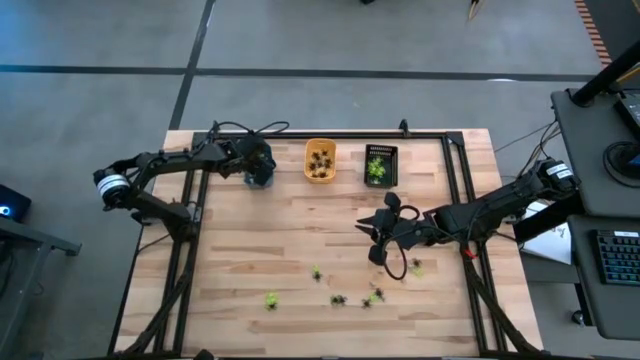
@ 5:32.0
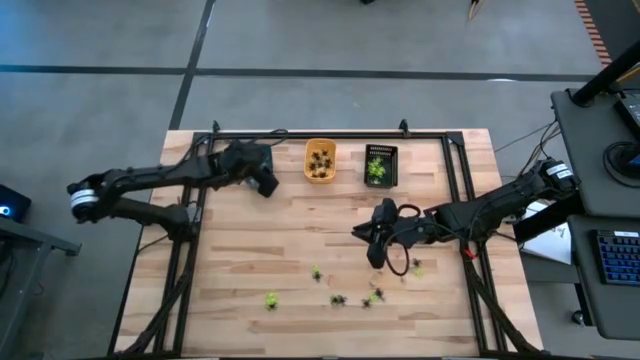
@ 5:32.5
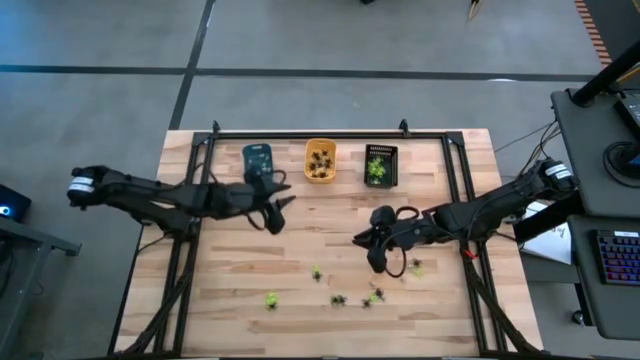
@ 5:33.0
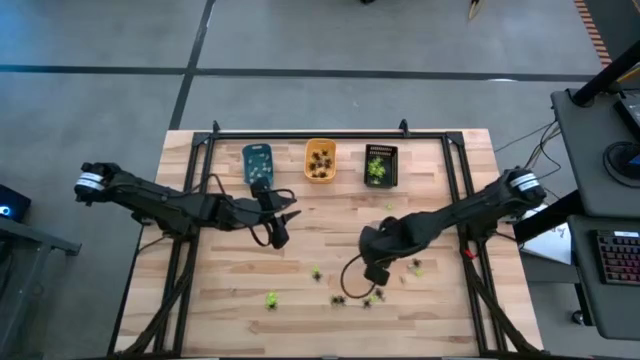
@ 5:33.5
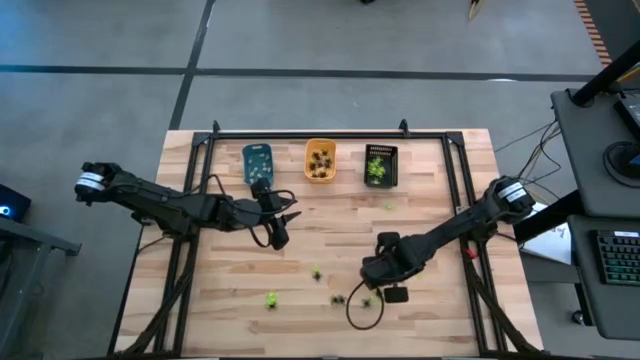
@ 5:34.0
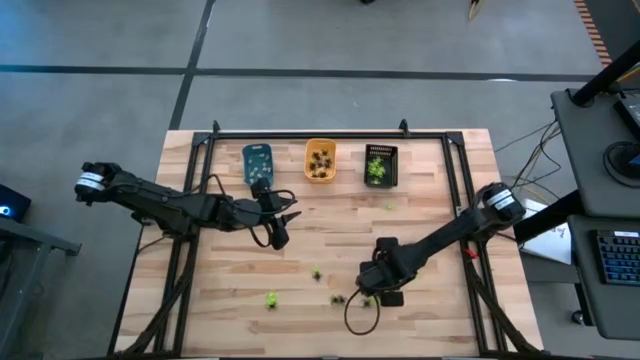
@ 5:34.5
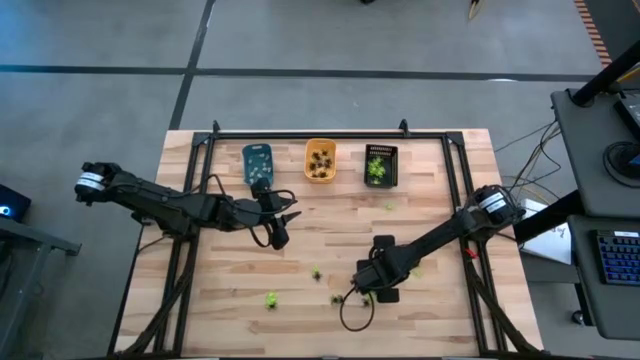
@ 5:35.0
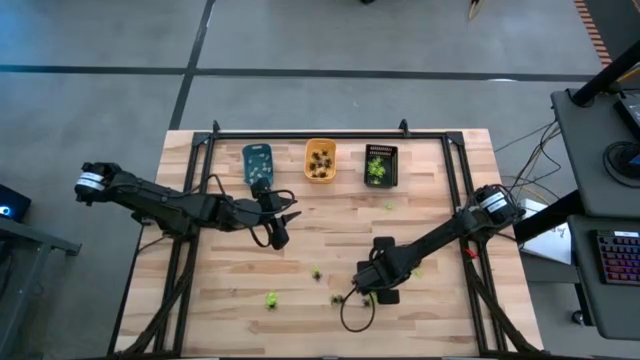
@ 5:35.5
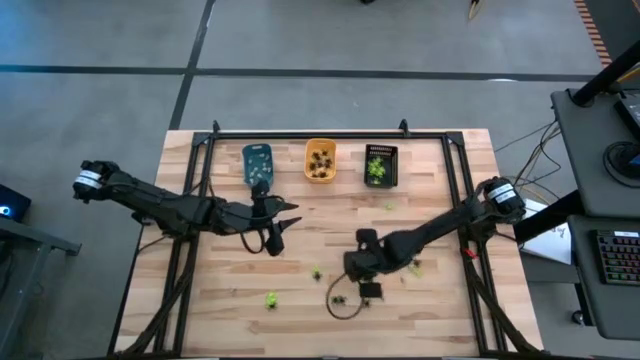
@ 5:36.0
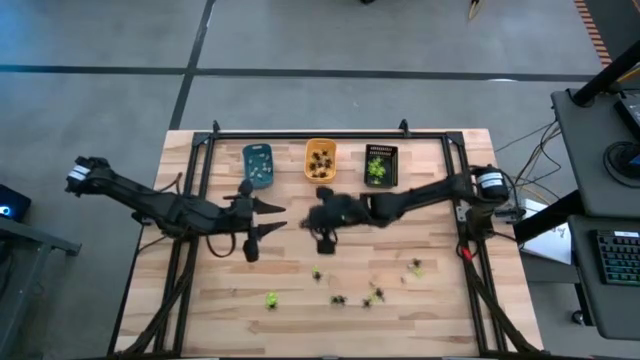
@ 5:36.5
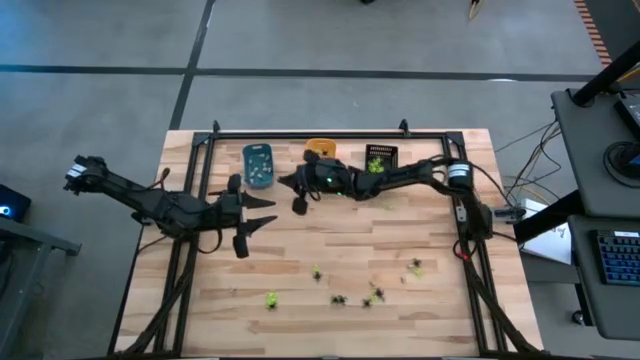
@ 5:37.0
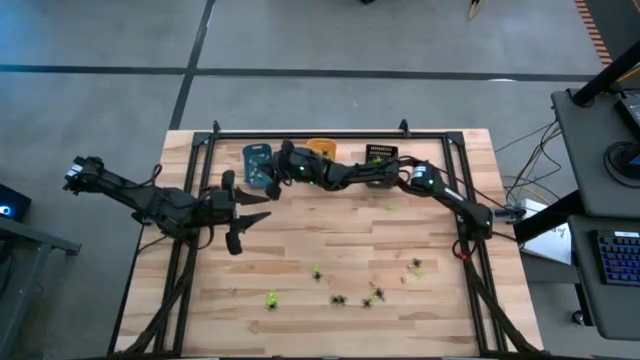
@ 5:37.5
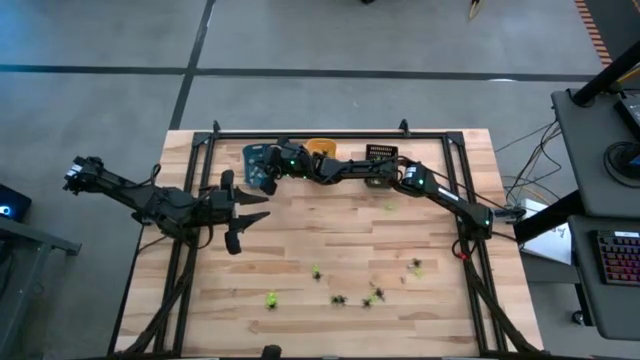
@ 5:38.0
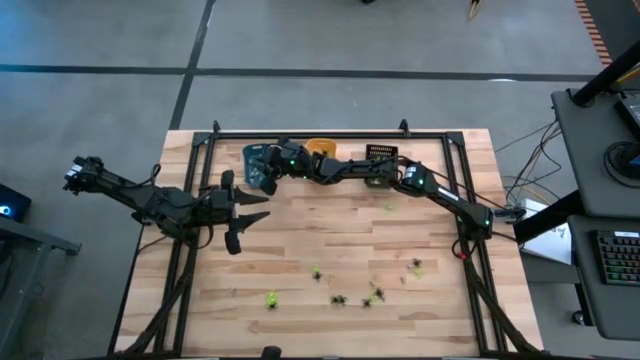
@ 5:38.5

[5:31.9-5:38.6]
Task: Sort Halloween decoration
Put the white skull toy into the blue bin

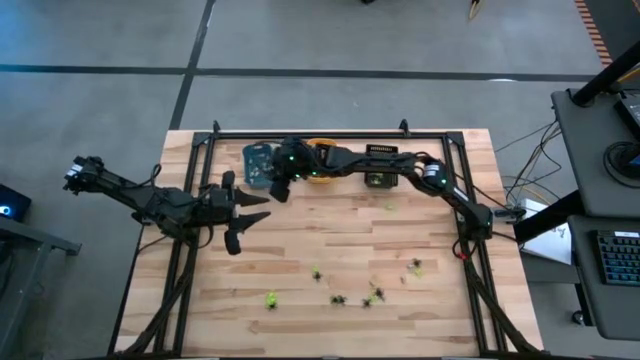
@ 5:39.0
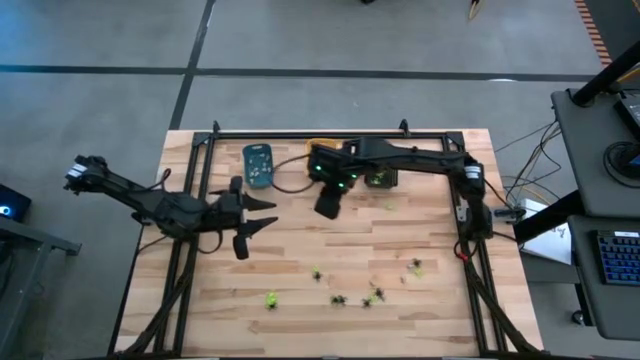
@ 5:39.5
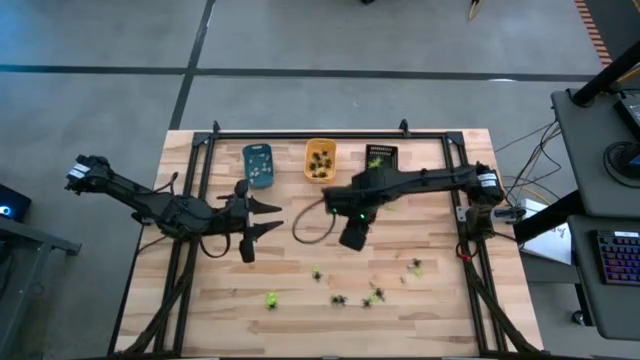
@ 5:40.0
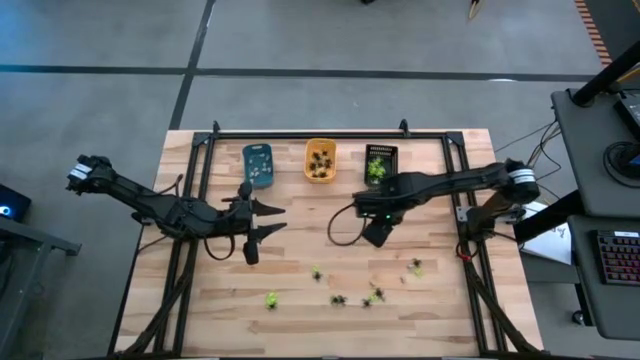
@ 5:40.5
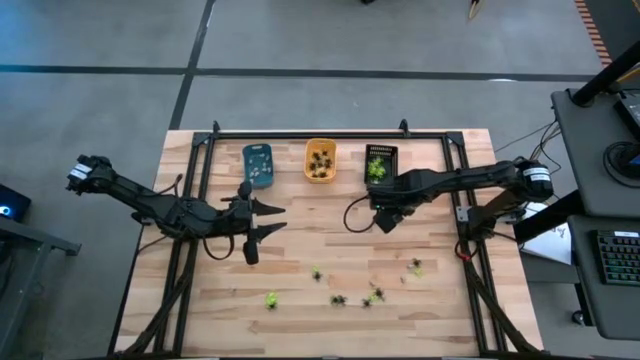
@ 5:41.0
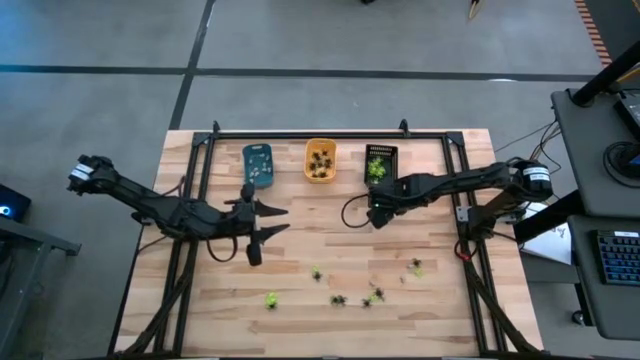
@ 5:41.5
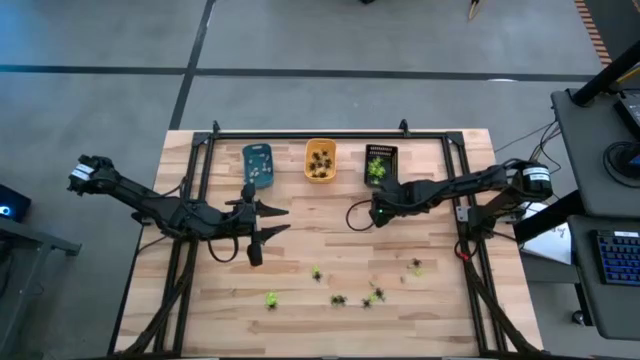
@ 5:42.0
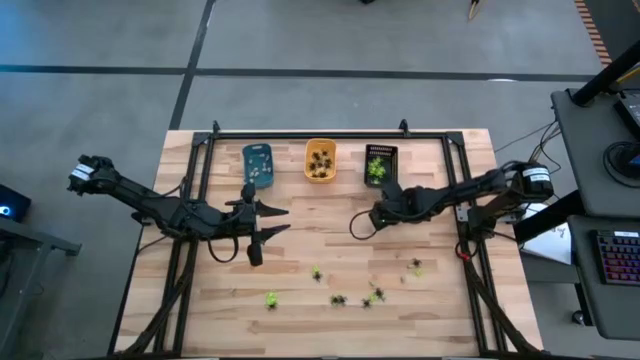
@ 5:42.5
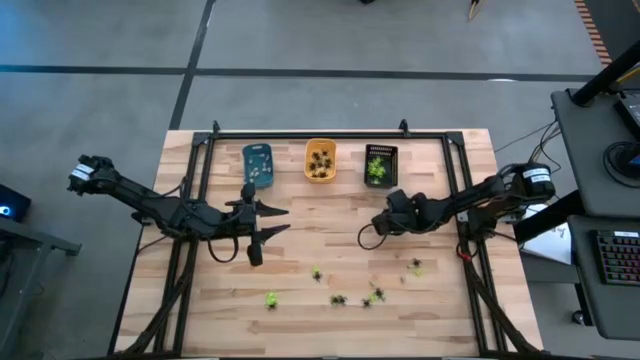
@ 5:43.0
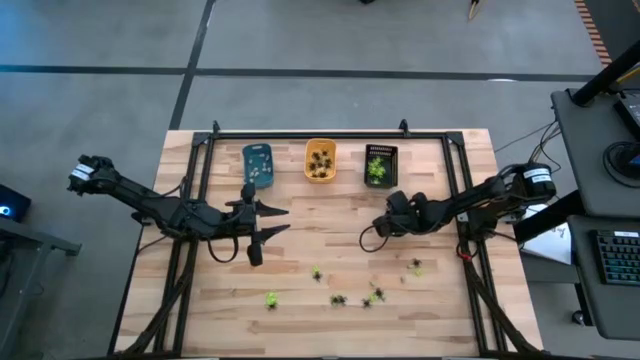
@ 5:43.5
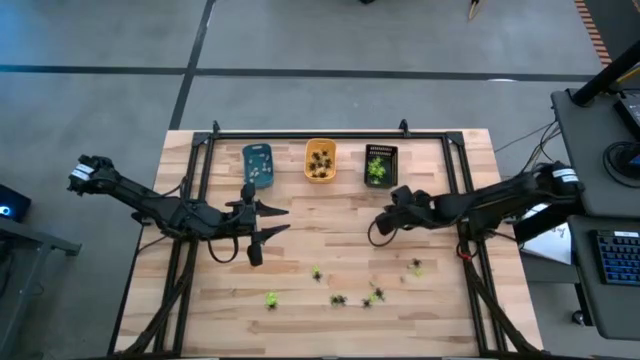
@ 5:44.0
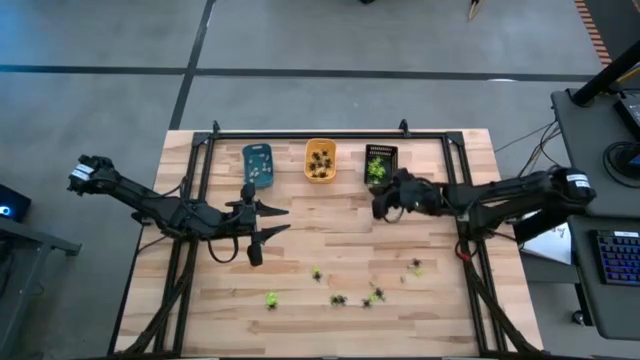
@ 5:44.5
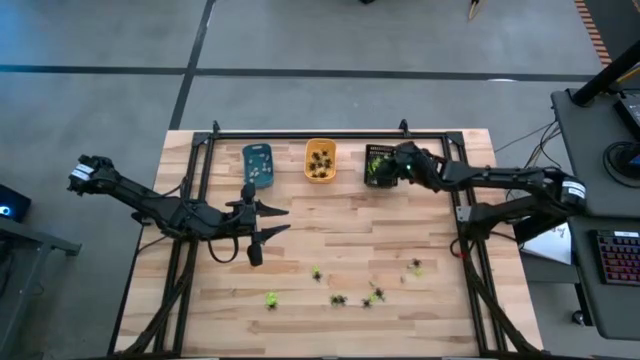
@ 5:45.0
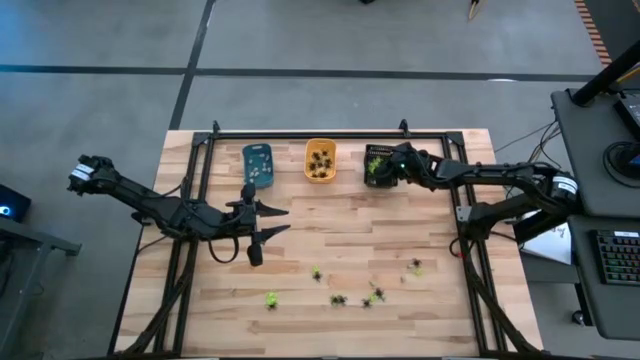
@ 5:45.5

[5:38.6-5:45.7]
Put the green spider toy into the black bin
